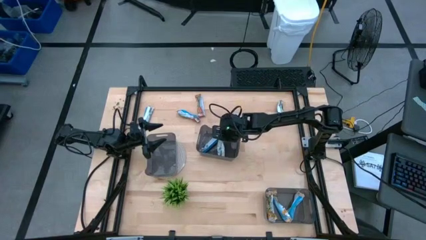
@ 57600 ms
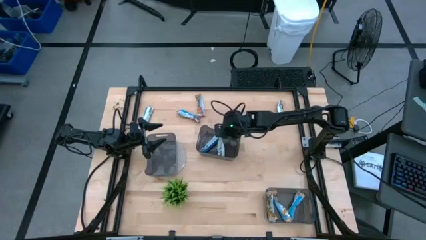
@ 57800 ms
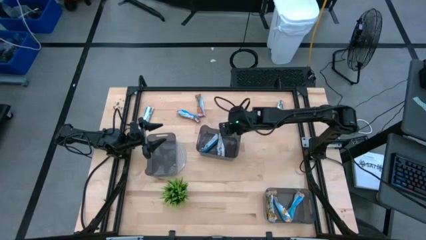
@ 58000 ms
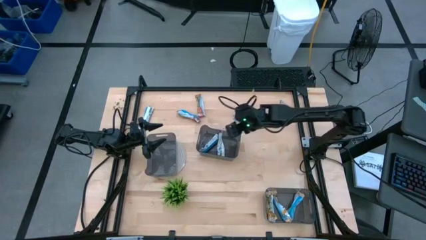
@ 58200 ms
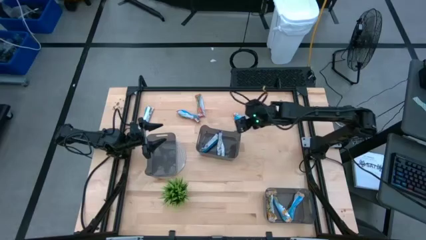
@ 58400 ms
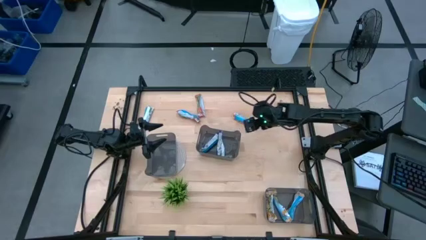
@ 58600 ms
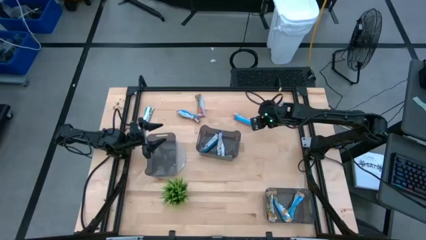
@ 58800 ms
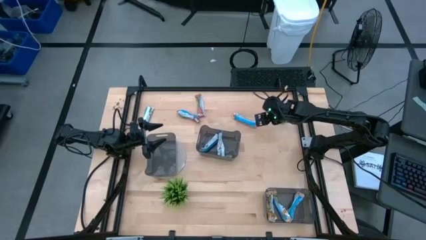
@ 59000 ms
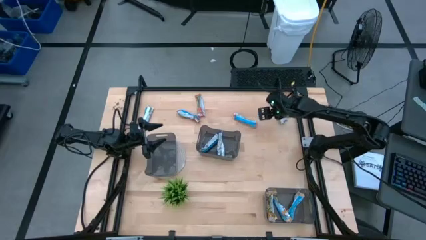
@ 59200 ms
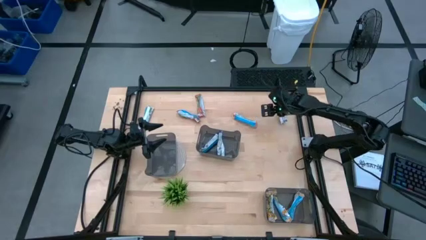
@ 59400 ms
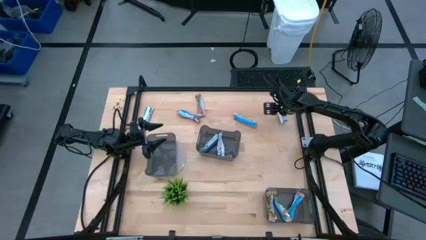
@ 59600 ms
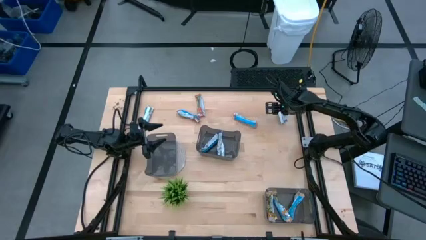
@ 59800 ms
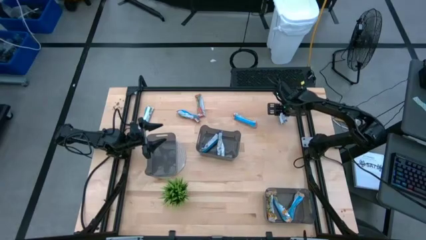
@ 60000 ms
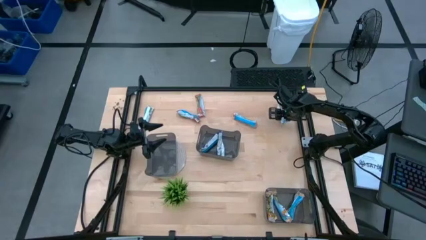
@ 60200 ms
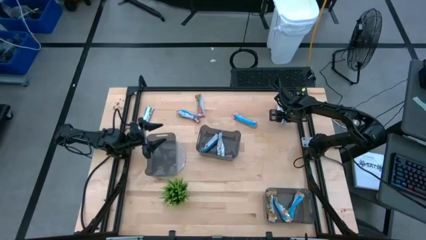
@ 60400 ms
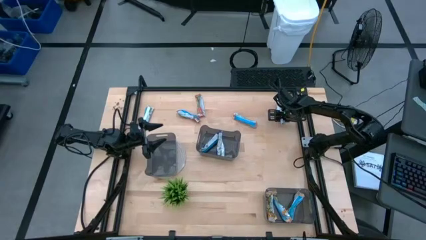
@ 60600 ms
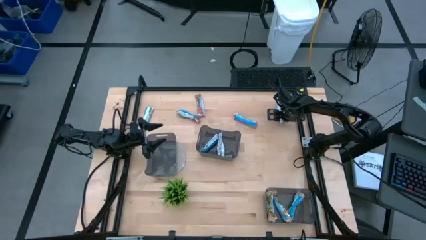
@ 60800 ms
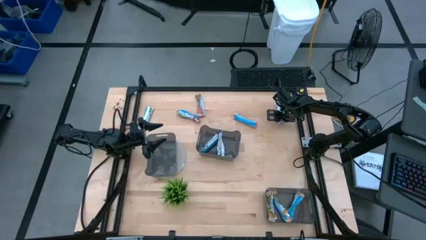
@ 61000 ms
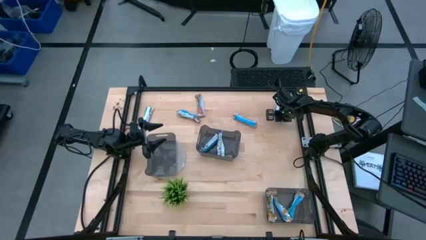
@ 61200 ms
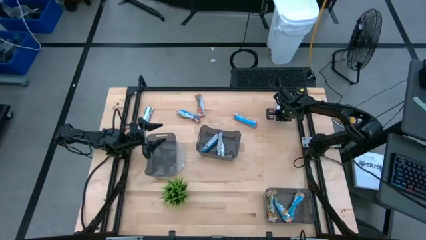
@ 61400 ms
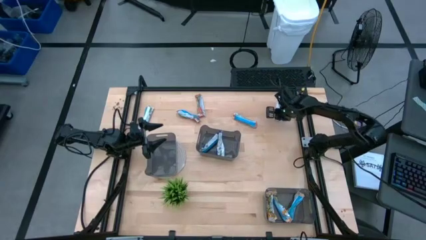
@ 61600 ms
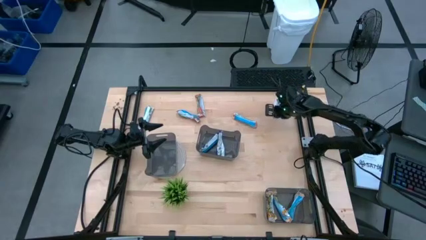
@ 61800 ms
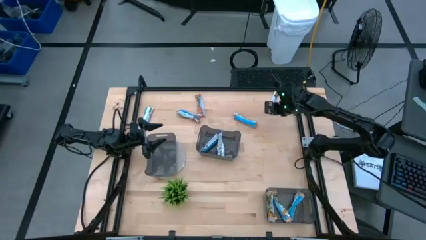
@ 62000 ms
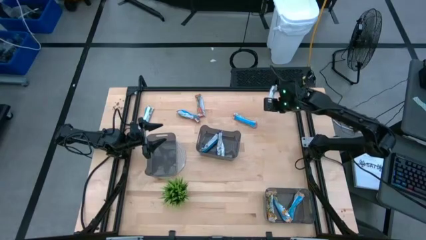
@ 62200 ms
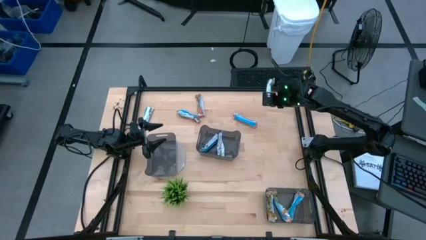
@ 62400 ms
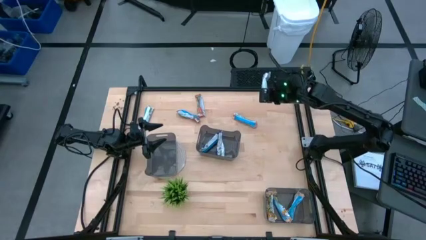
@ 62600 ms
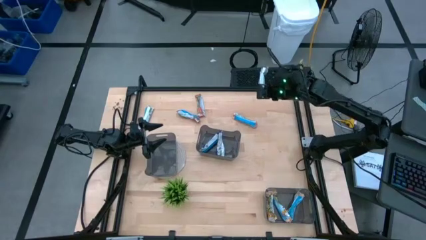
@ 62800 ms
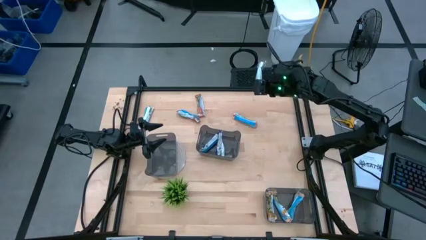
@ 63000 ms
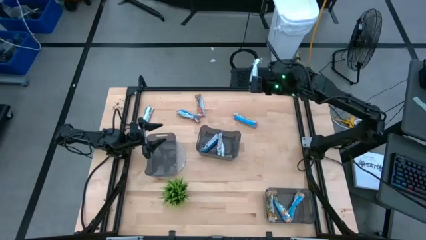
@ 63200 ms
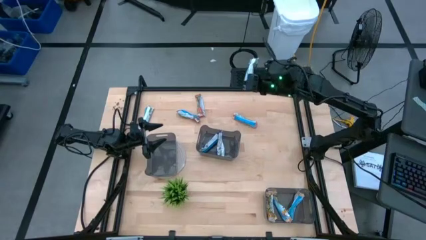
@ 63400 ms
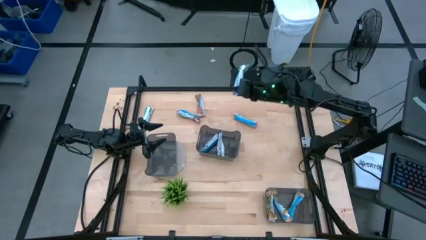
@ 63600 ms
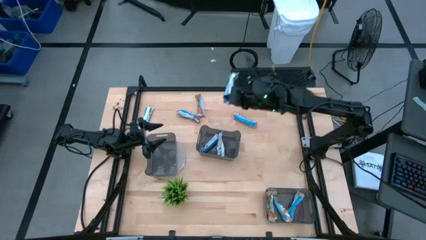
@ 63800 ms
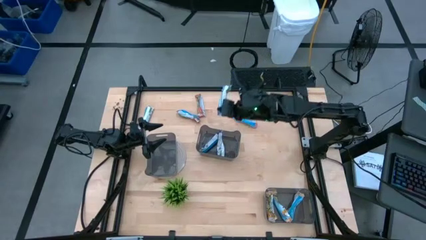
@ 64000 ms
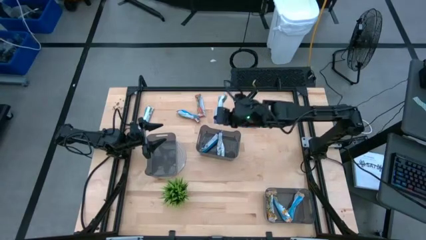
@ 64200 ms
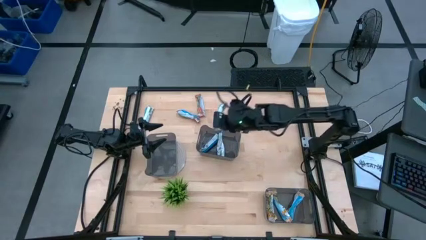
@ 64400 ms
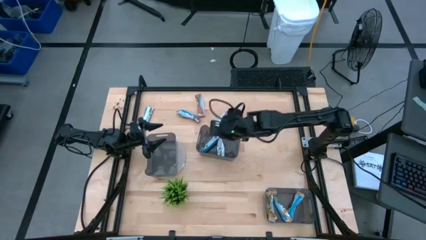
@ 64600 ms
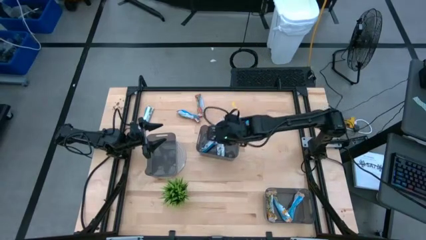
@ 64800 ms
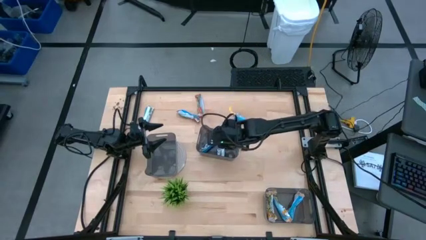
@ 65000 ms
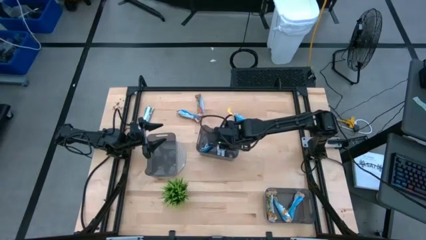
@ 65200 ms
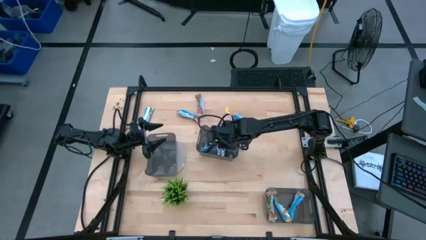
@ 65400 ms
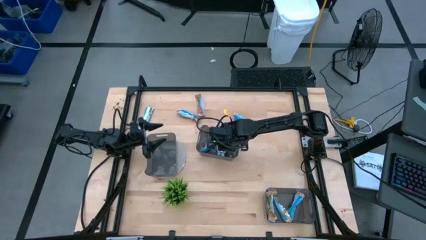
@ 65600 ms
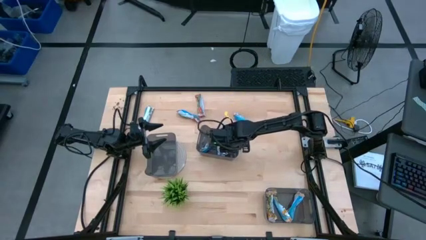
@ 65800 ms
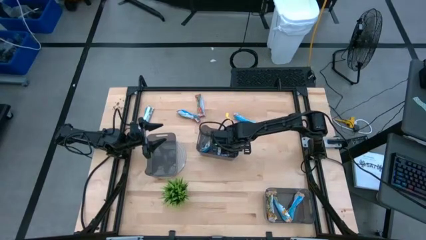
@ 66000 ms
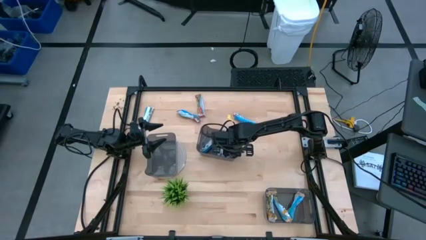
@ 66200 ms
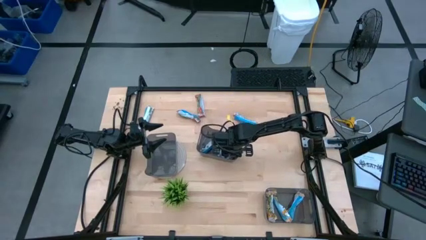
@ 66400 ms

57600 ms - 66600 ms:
Task: Pick and place Granola Bars by type
Put the blue granola bar into the top black bin

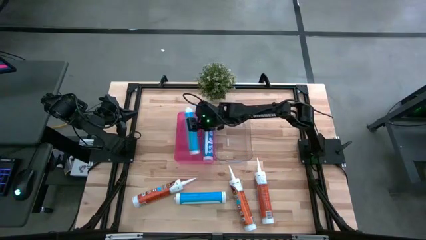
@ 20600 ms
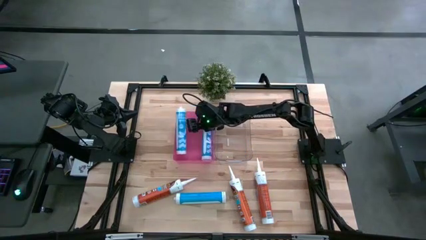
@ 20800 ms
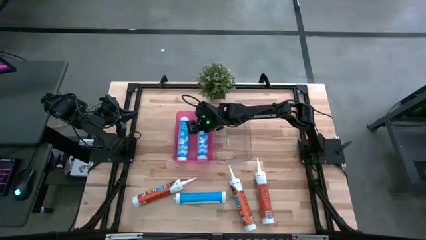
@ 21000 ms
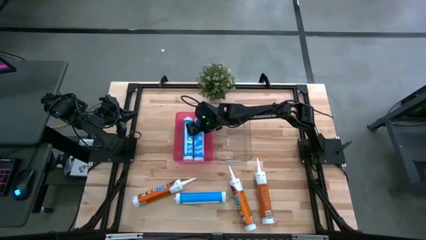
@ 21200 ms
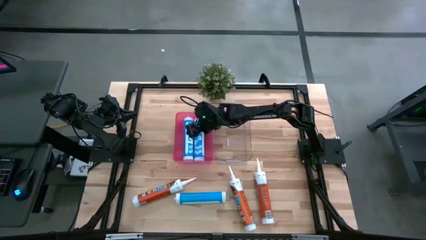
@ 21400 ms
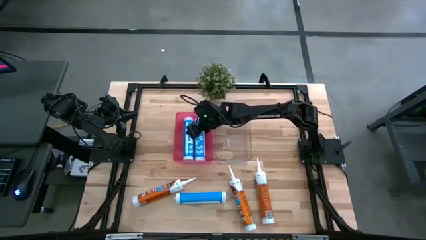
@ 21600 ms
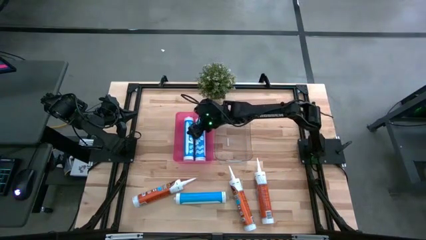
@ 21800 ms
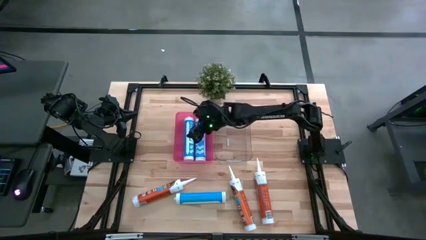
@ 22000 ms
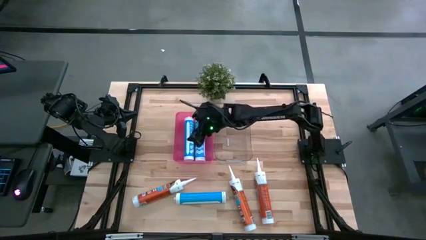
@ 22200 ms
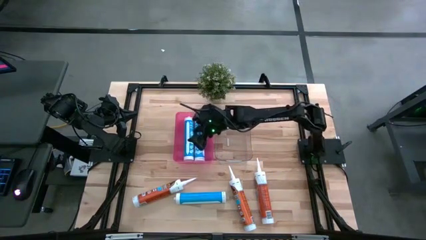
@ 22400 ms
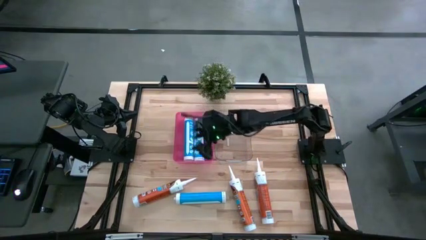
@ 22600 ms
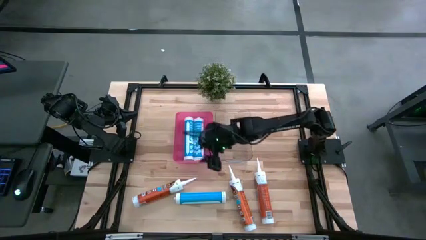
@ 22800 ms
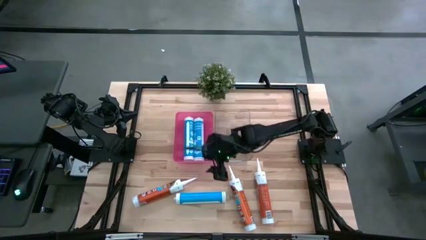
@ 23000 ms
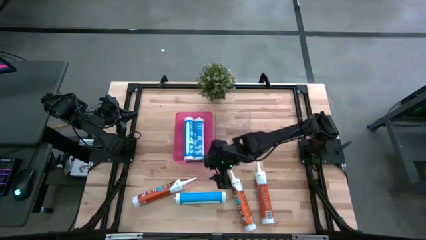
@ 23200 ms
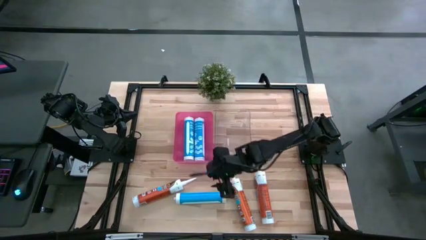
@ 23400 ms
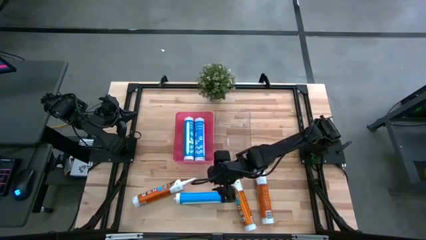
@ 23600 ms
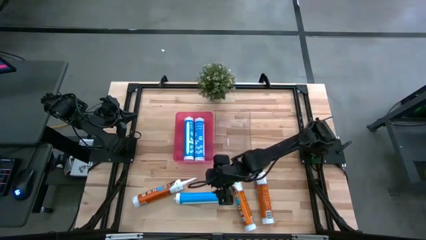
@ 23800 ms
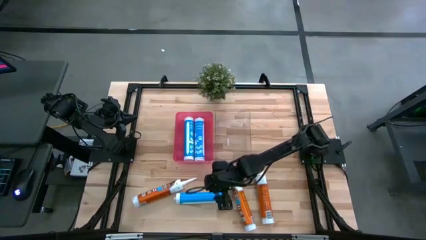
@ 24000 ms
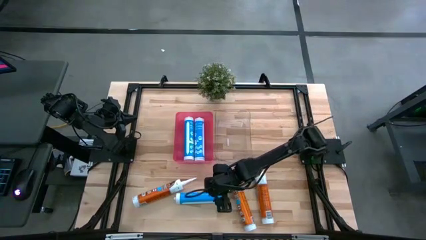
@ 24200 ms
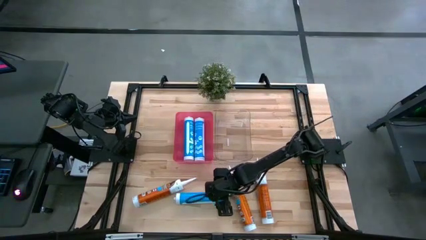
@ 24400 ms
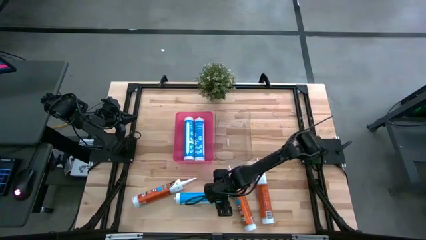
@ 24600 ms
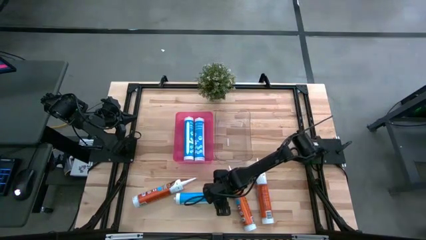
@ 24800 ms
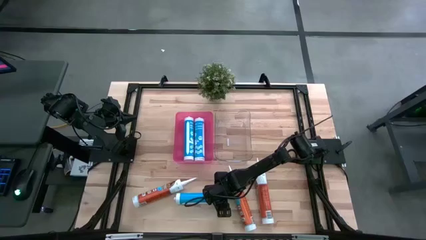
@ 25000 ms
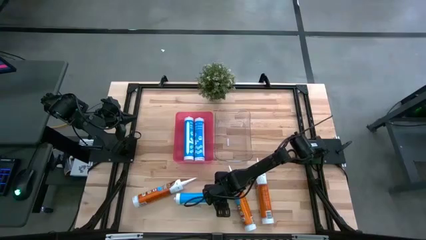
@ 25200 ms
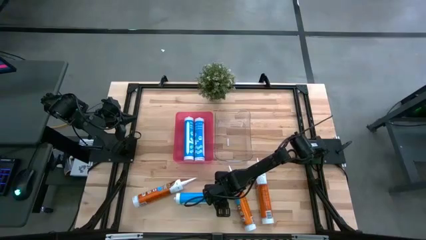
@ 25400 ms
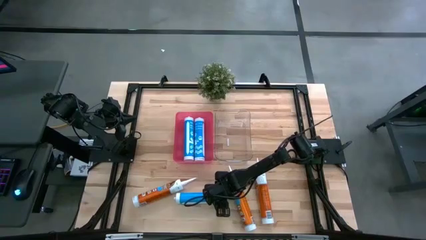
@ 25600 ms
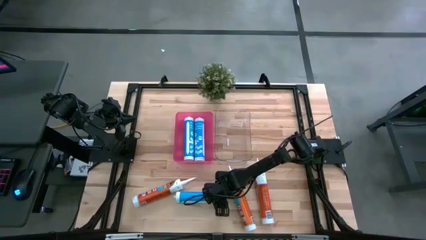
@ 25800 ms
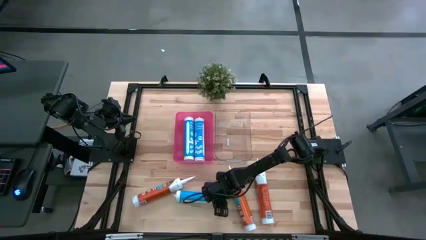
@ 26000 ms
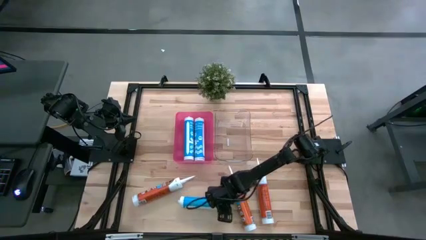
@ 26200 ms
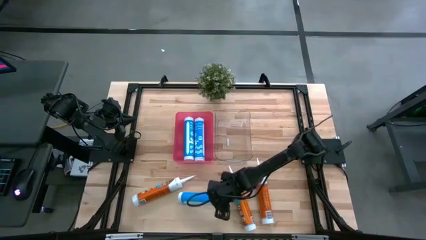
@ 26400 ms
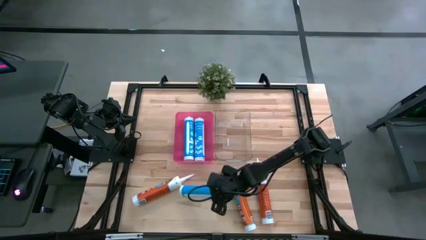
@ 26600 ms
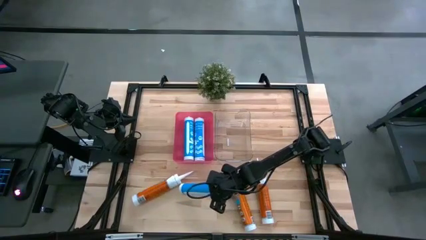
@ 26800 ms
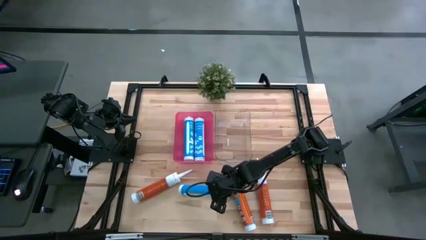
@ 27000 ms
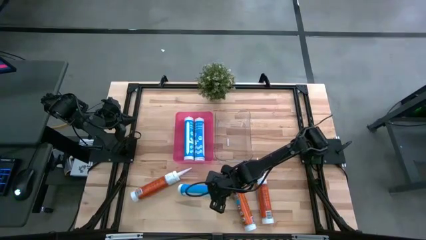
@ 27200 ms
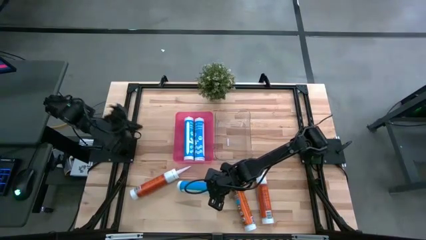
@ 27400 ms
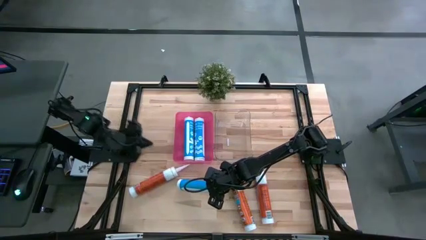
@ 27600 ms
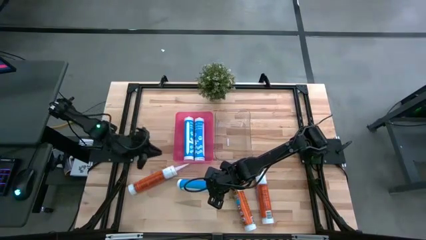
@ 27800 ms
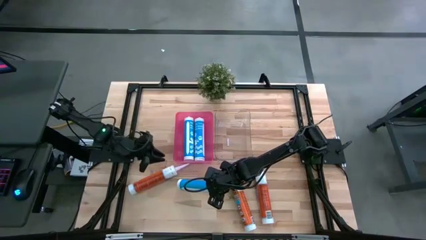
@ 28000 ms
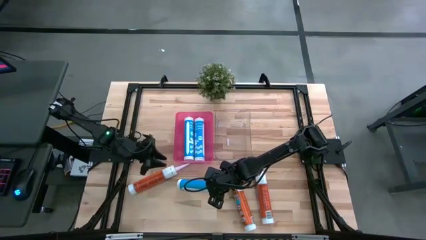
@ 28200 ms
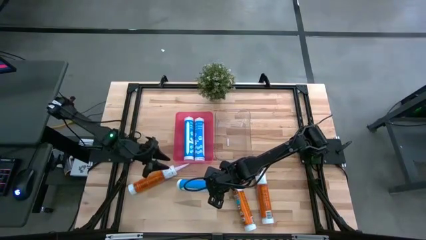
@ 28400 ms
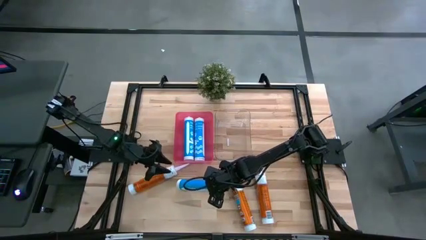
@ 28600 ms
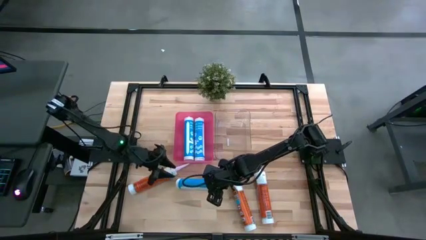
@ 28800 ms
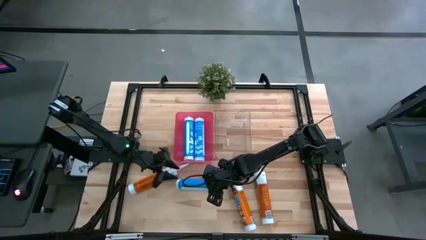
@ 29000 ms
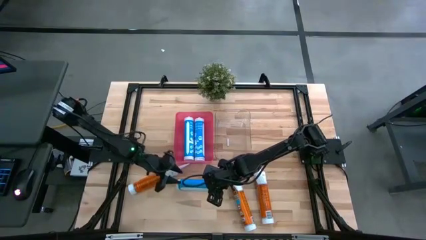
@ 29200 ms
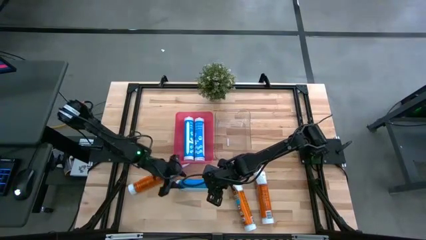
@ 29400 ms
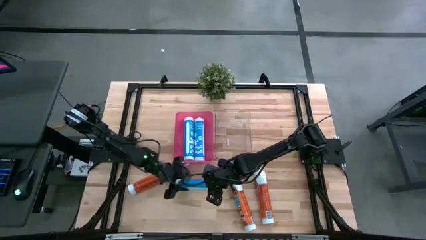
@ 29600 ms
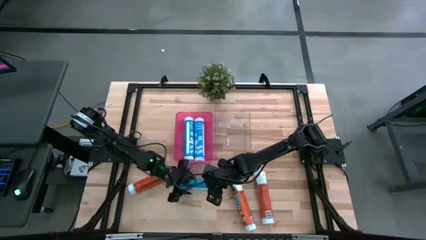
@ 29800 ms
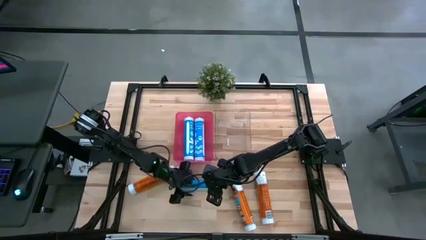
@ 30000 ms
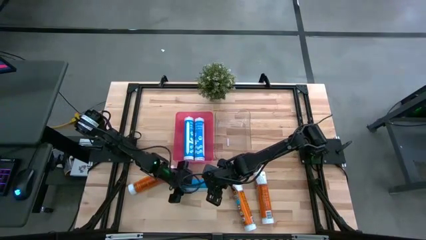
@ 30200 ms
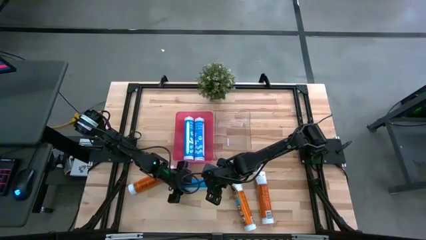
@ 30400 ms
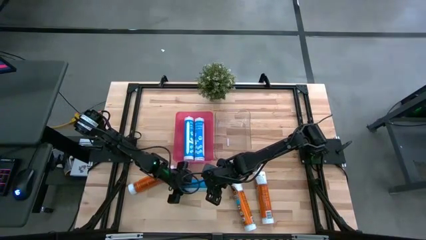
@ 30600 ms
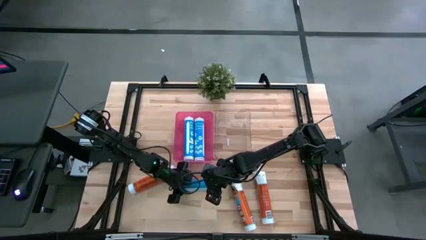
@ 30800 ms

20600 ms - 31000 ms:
Task: Pick & place silicon tubes, Sealant and Lysol wipes
Put the blue sealant into the pink bin
